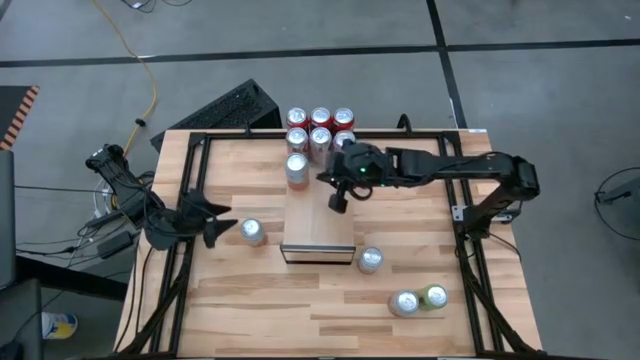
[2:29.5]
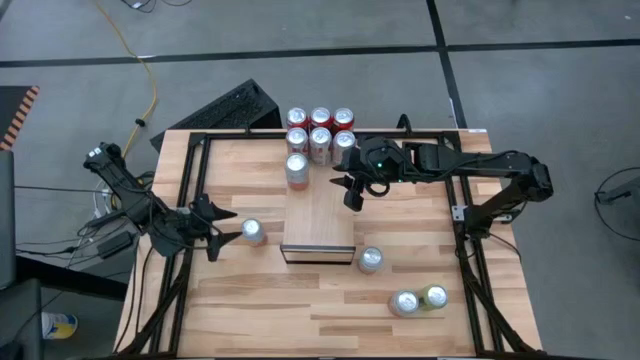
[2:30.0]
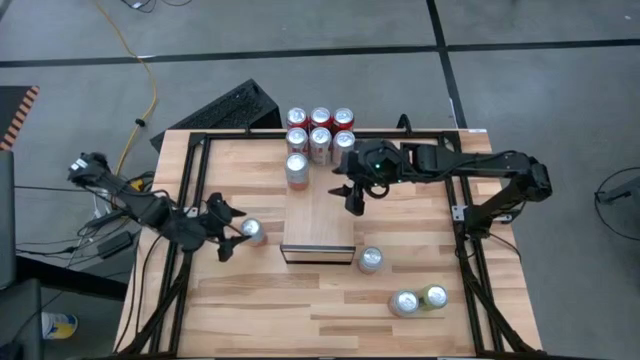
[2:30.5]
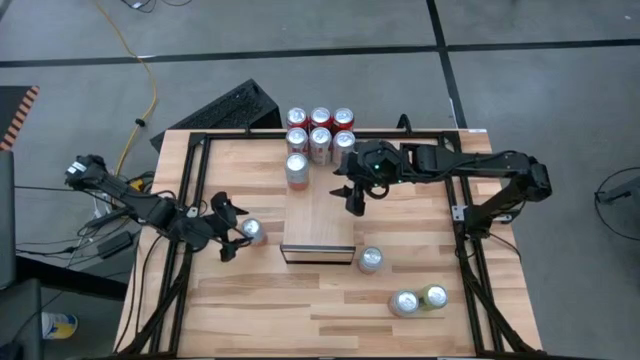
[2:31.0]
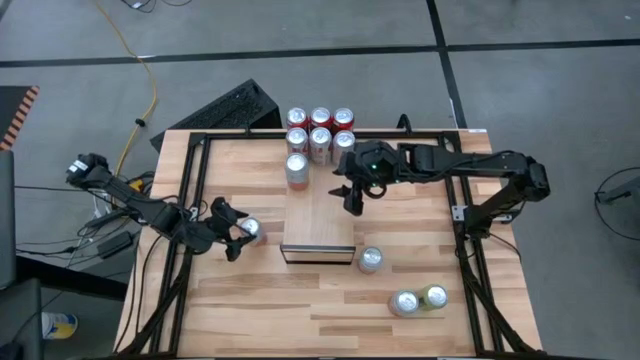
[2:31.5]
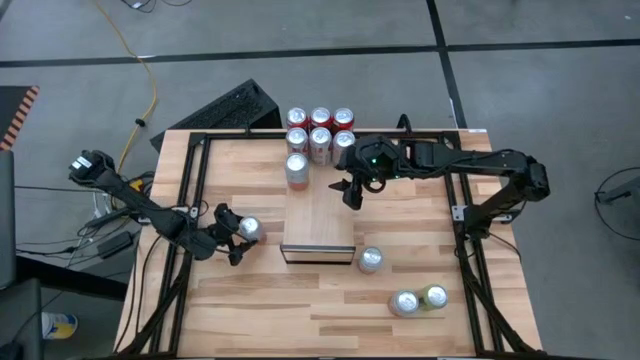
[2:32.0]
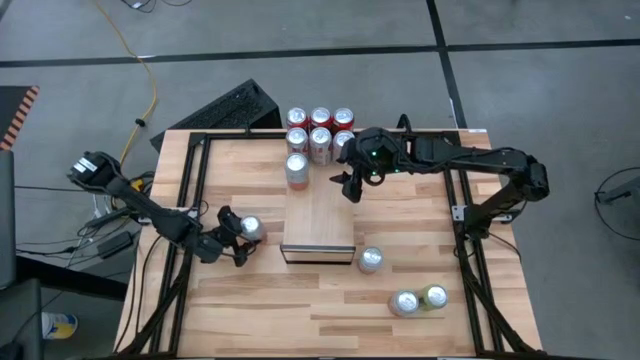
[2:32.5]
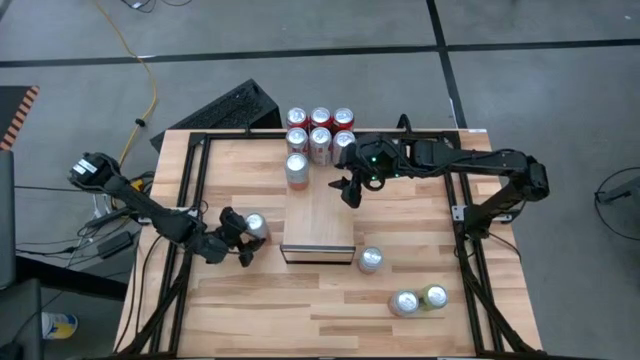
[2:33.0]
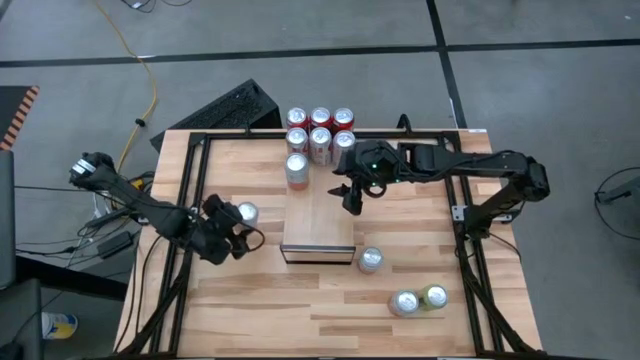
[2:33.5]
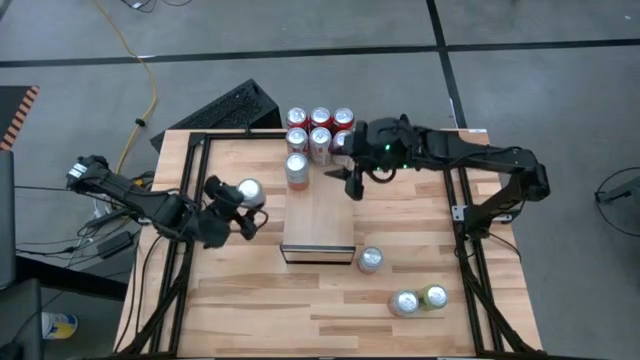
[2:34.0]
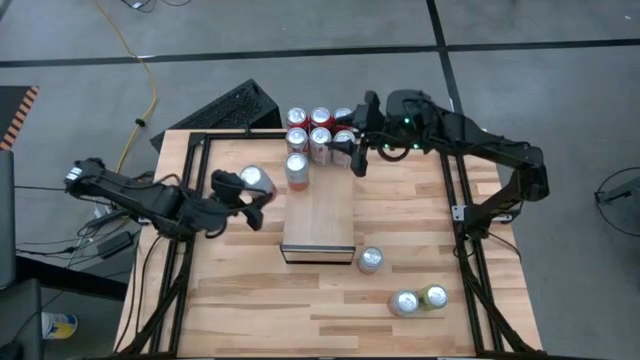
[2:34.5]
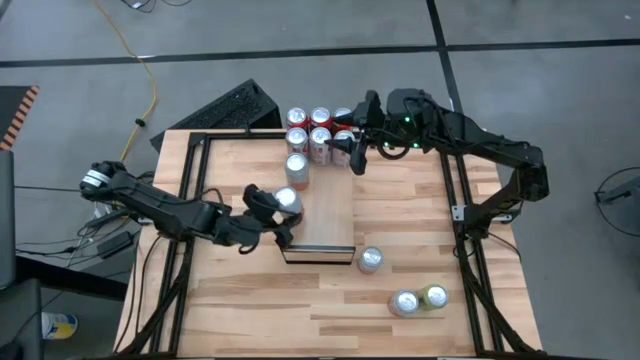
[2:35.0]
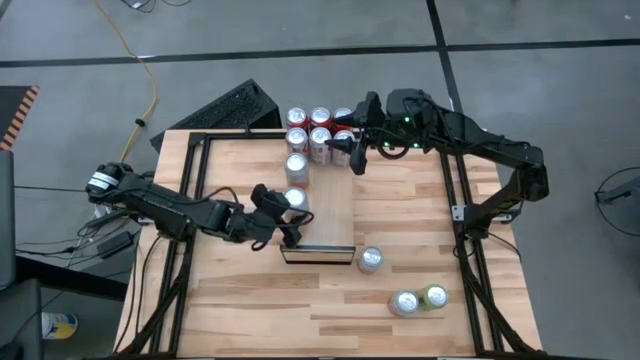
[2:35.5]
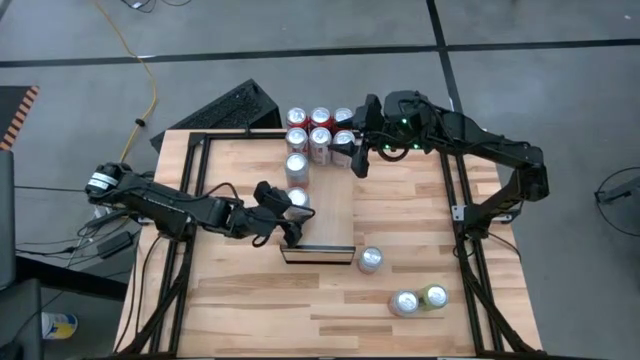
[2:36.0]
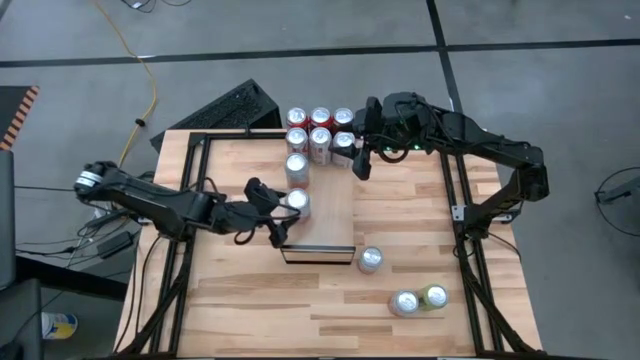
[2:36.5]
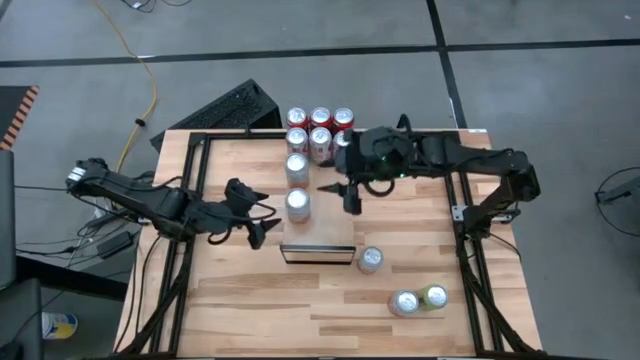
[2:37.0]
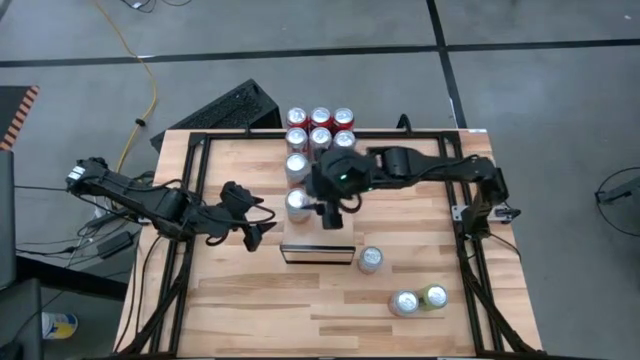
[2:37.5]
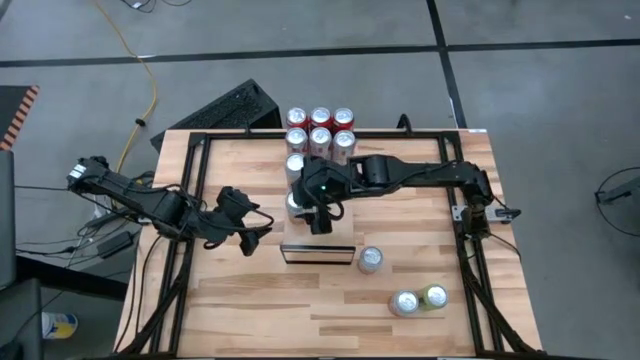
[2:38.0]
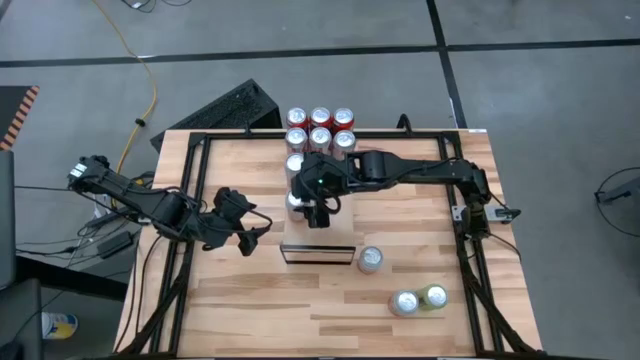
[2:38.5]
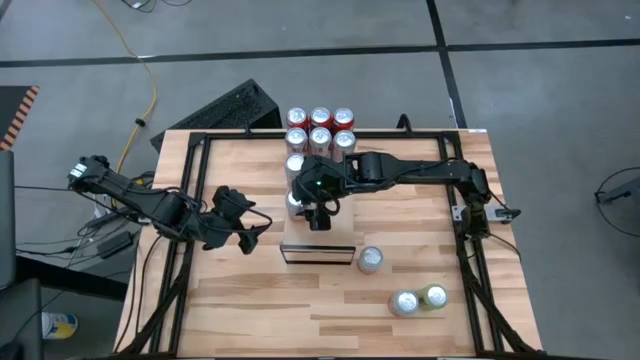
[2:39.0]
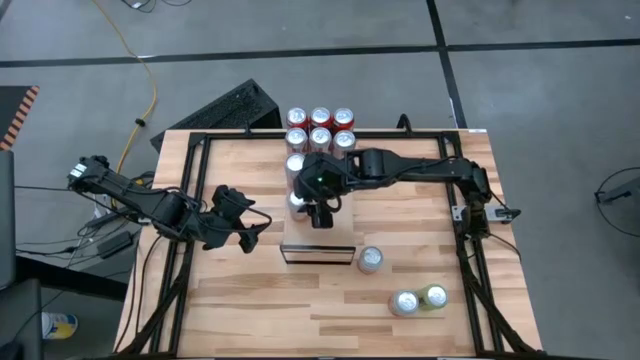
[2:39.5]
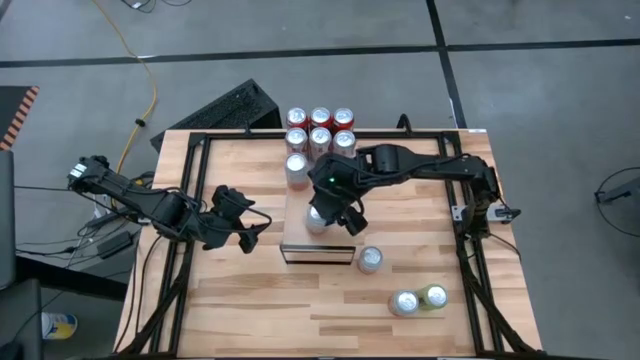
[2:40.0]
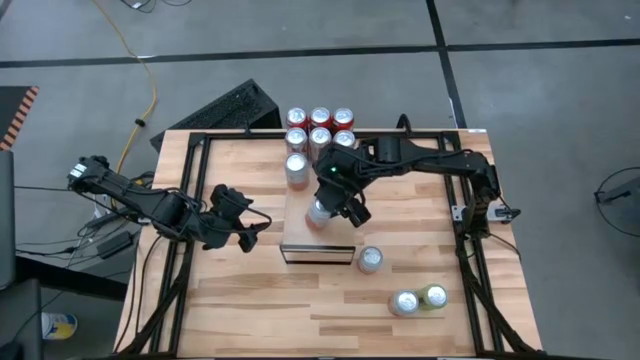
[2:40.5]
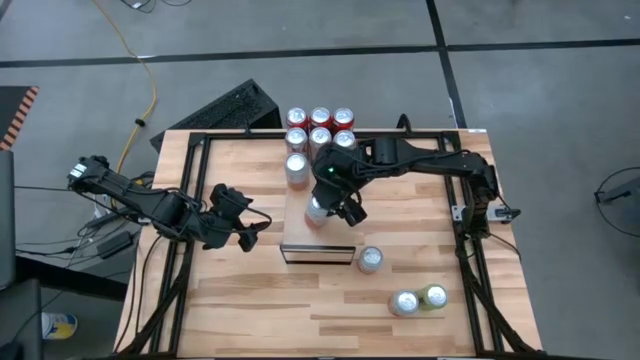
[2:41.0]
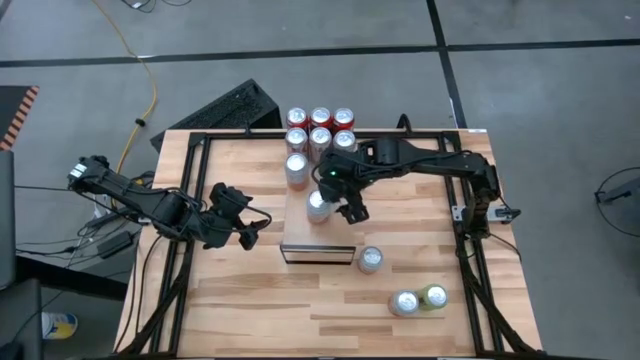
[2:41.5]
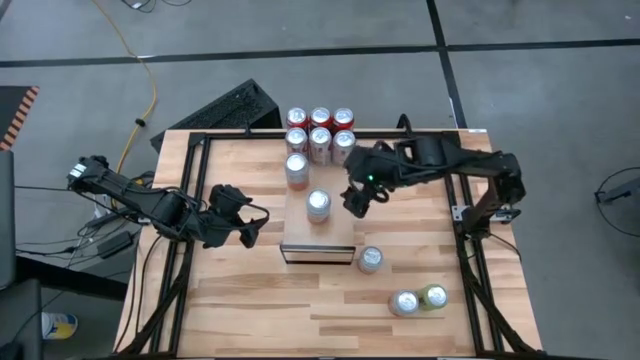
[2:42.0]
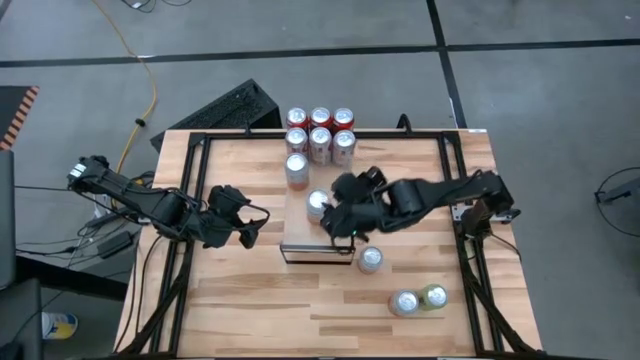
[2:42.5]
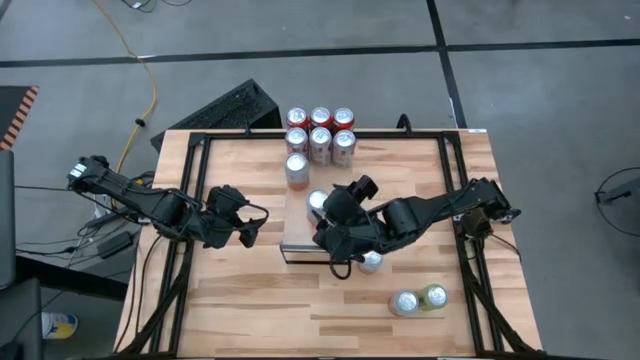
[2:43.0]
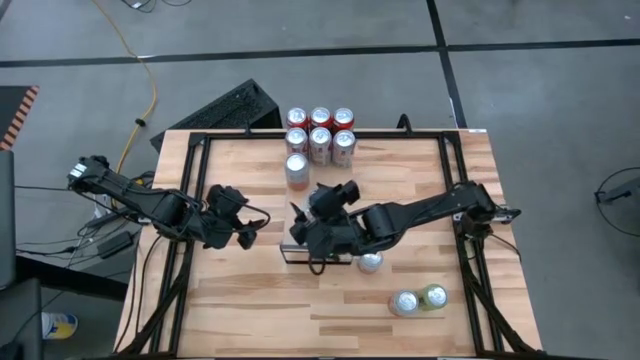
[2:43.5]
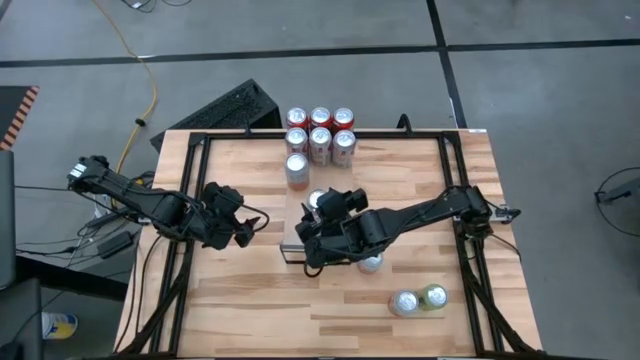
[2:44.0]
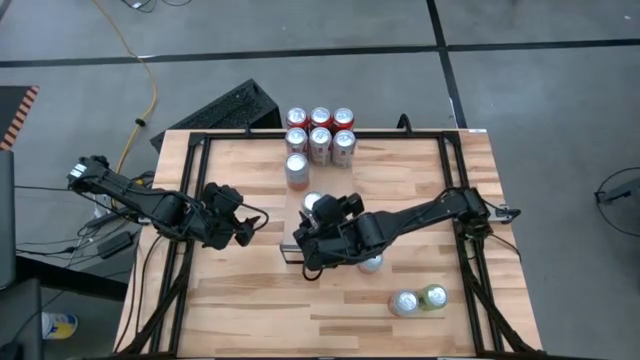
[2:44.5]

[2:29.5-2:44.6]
Task: Place canned beverage on shelf
Put the left orange-white soda can on the shelf aligned with the other orange-white soda can

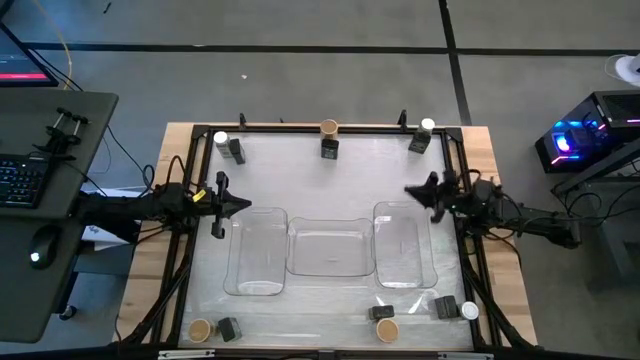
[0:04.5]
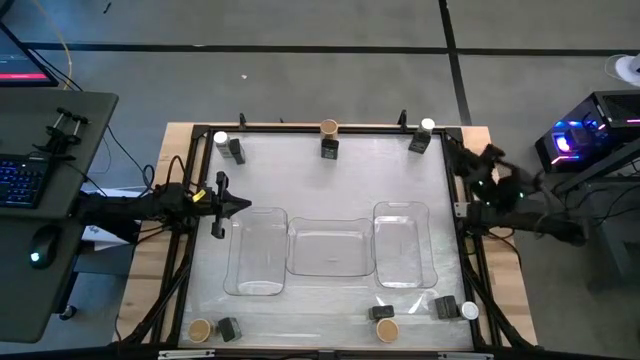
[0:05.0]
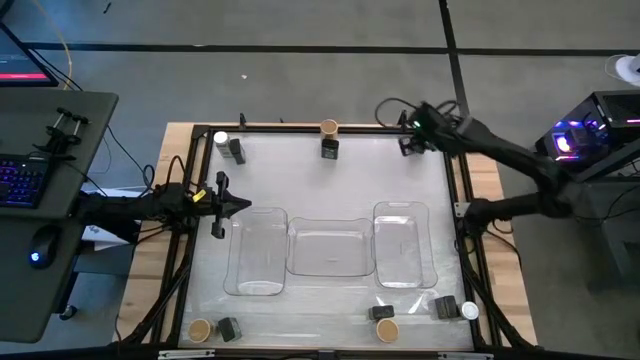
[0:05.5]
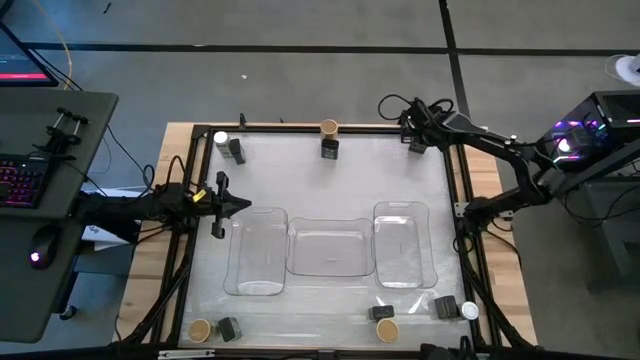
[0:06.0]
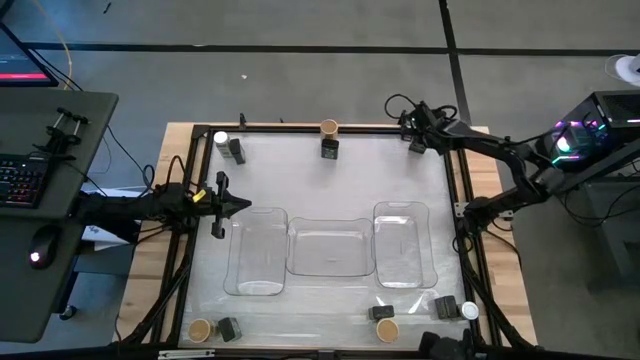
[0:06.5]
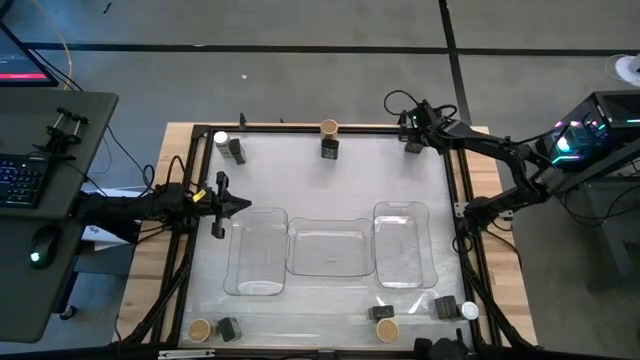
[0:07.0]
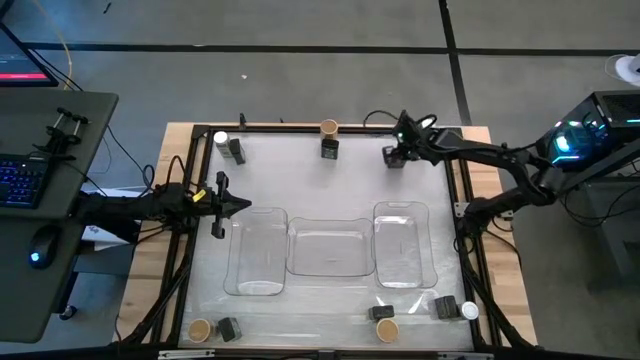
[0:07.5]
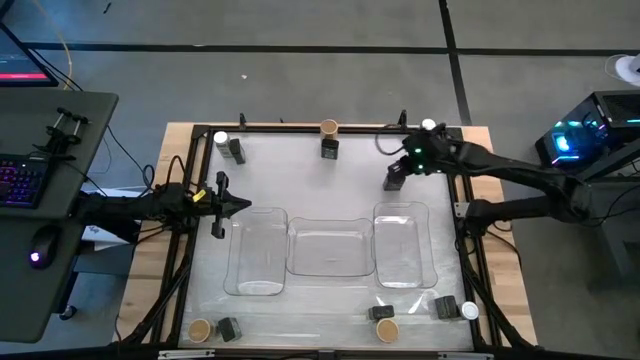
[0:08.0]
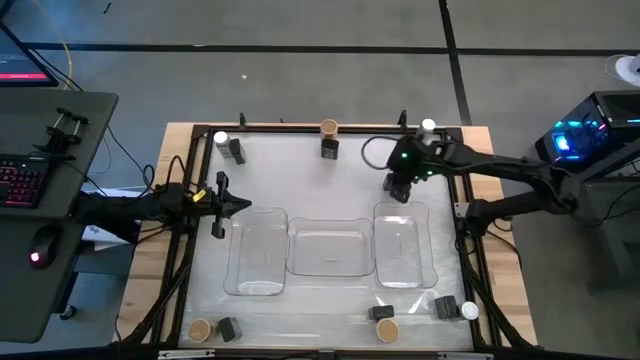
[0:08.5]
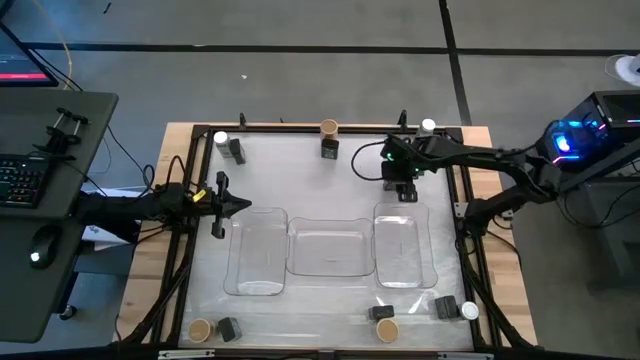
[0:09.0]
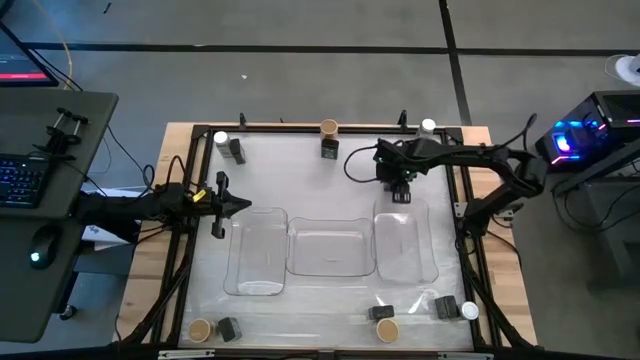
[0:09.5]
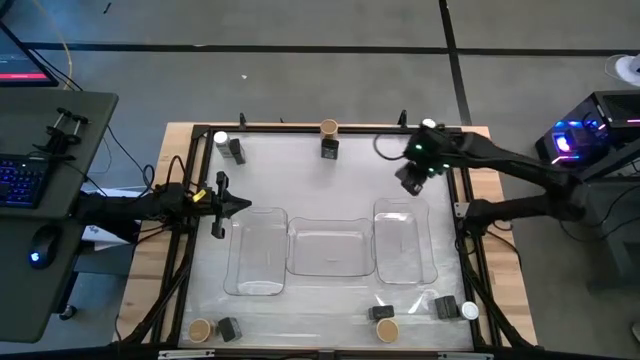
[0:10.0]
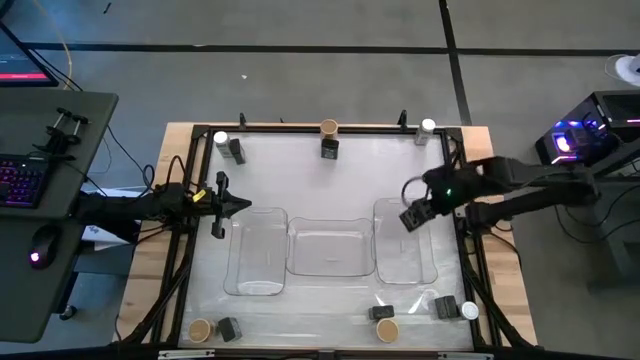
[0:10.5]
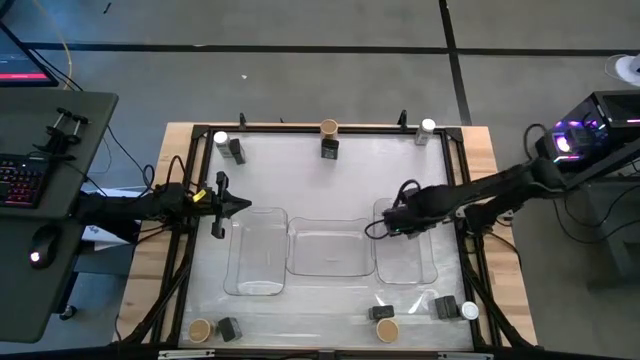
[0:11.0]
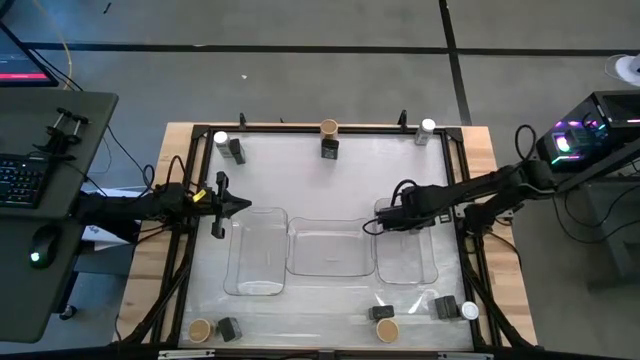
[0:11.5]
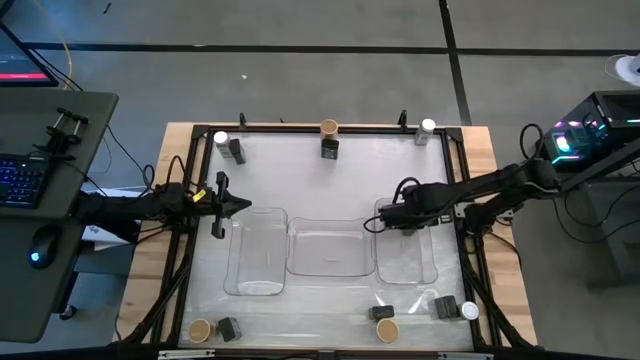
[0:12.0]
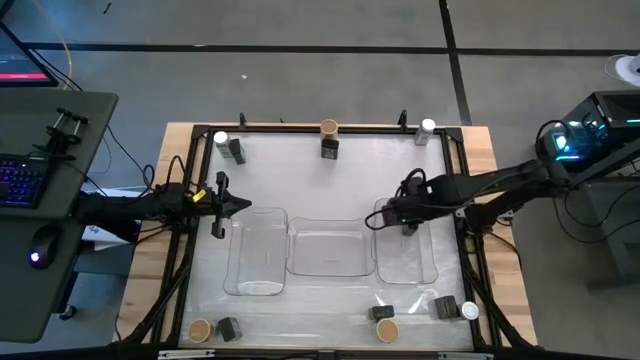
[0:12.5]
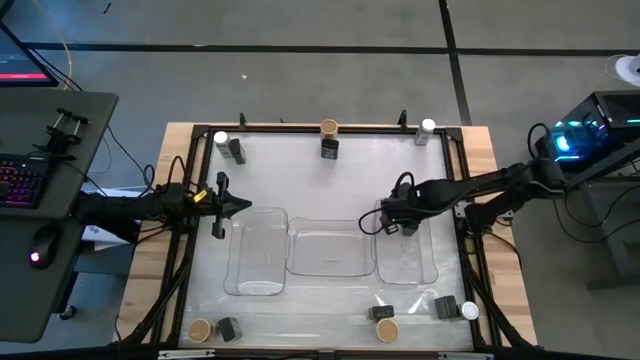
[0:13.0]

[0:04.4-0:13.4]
Task: Sort spices by type
Put the black seasoning can into the right transparent bin
